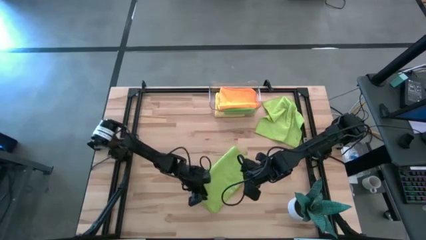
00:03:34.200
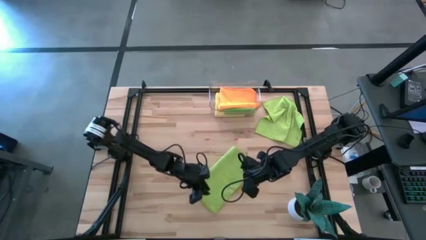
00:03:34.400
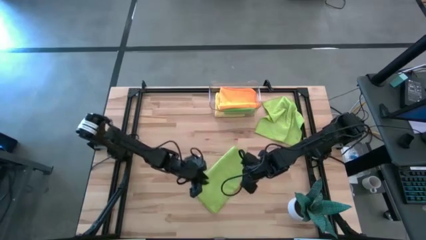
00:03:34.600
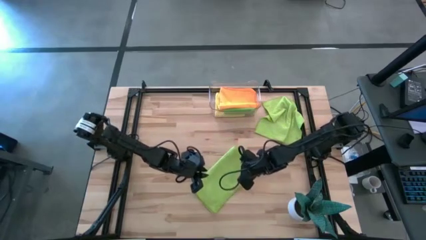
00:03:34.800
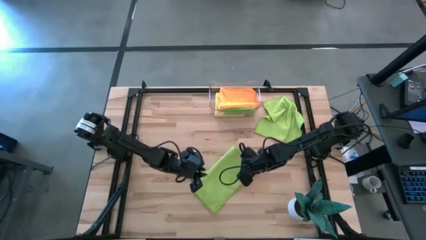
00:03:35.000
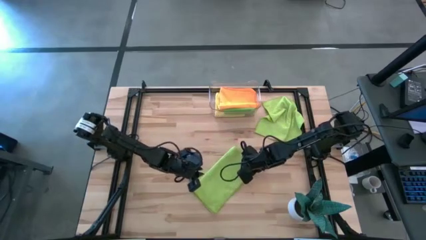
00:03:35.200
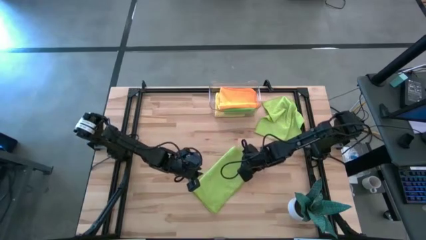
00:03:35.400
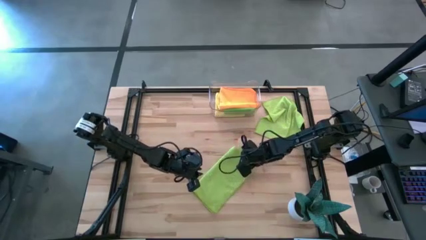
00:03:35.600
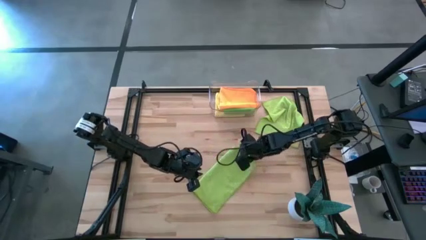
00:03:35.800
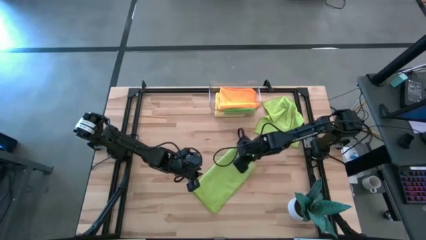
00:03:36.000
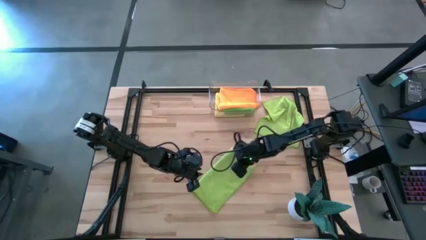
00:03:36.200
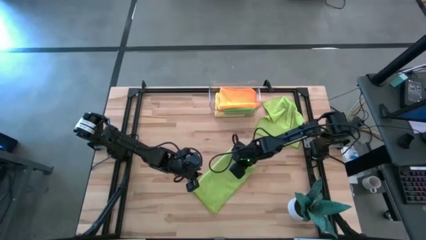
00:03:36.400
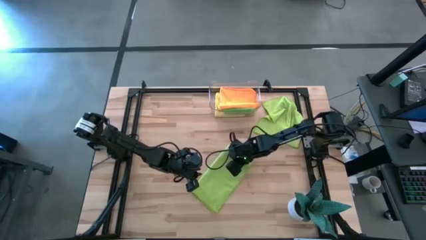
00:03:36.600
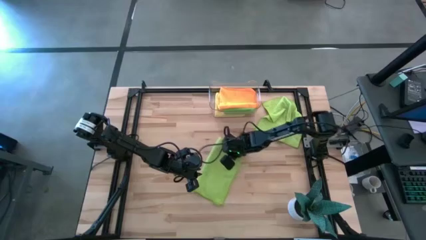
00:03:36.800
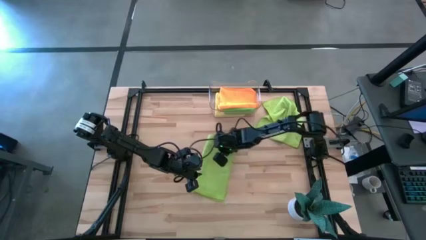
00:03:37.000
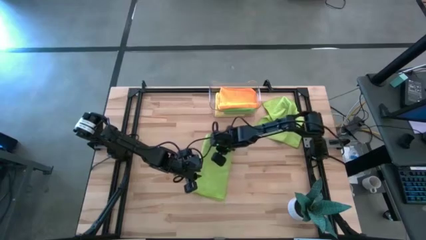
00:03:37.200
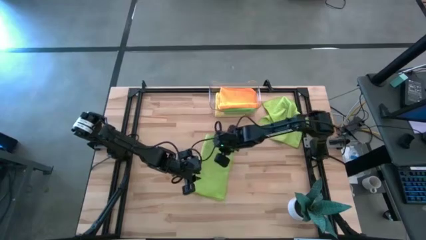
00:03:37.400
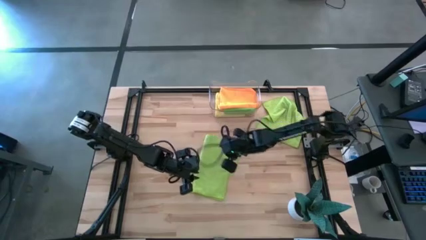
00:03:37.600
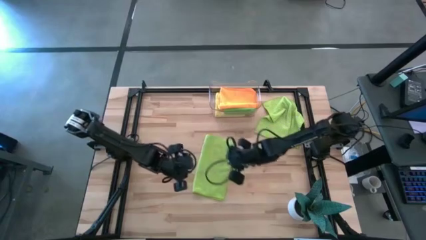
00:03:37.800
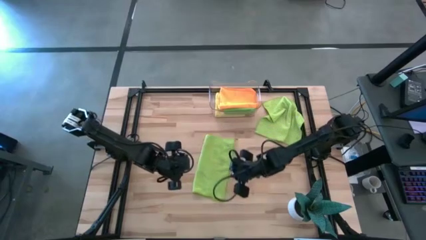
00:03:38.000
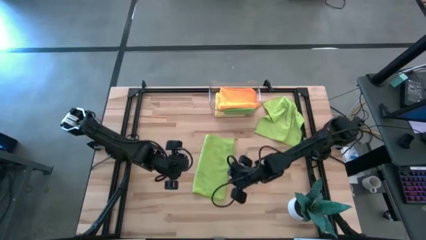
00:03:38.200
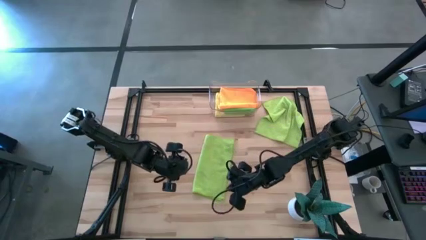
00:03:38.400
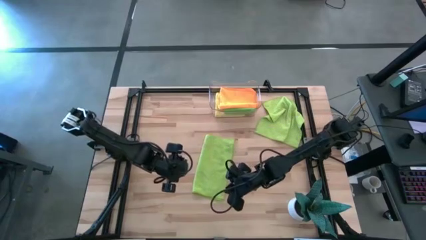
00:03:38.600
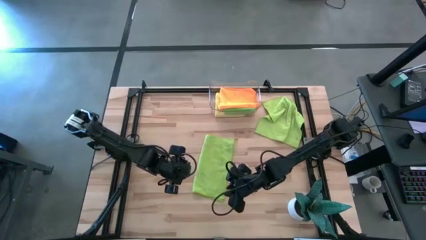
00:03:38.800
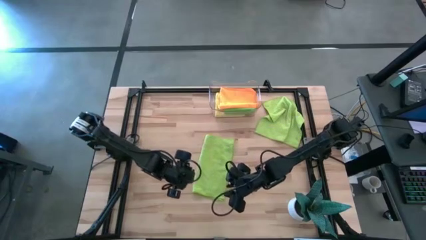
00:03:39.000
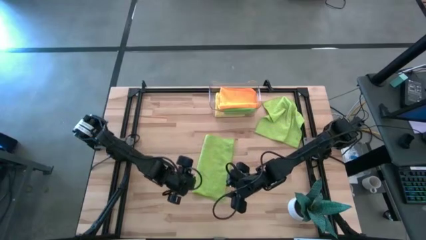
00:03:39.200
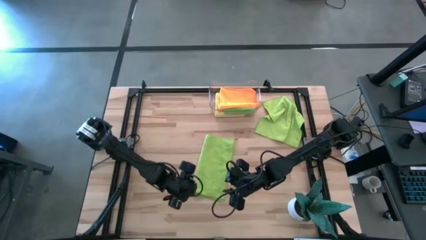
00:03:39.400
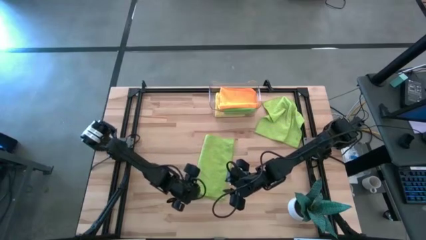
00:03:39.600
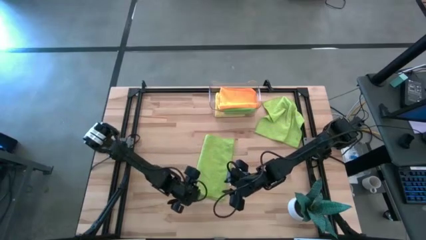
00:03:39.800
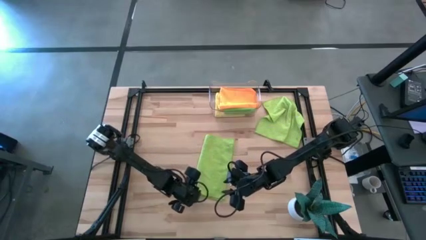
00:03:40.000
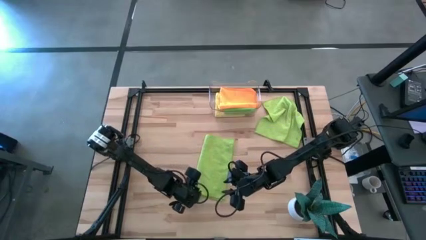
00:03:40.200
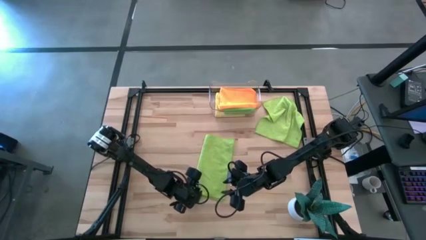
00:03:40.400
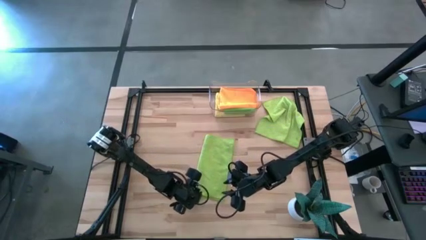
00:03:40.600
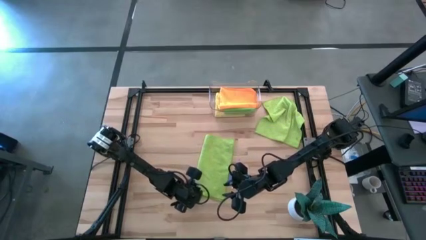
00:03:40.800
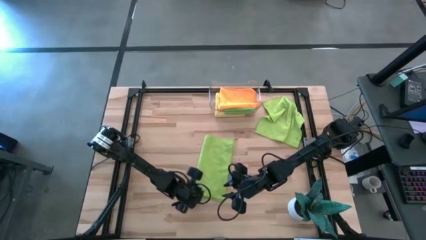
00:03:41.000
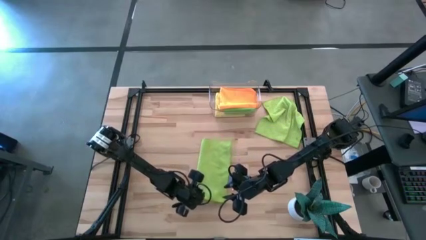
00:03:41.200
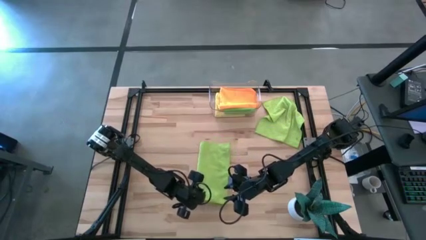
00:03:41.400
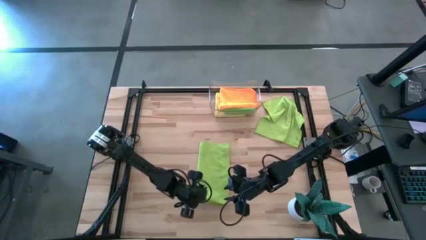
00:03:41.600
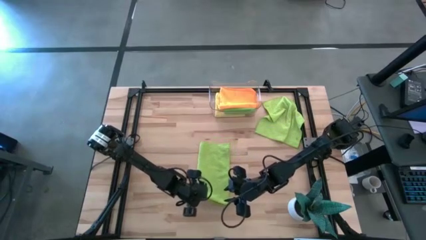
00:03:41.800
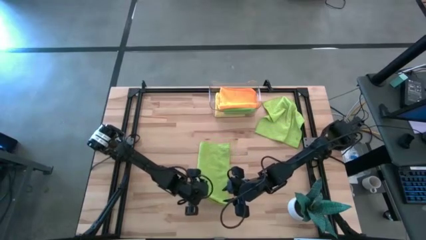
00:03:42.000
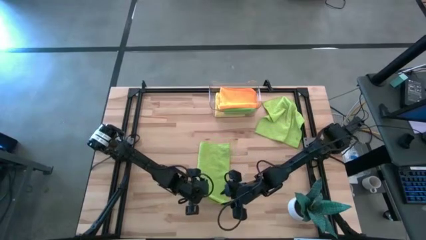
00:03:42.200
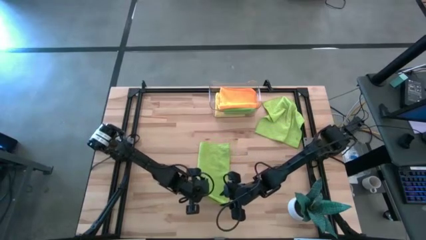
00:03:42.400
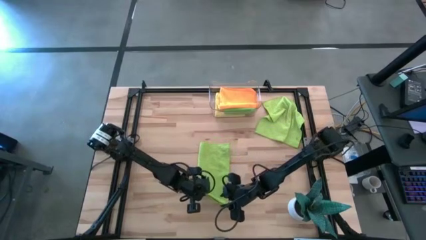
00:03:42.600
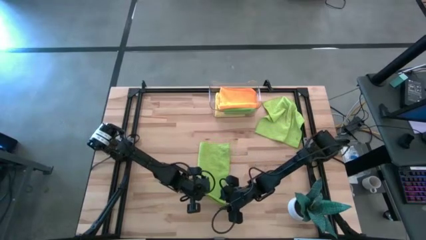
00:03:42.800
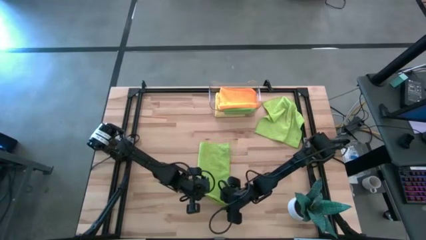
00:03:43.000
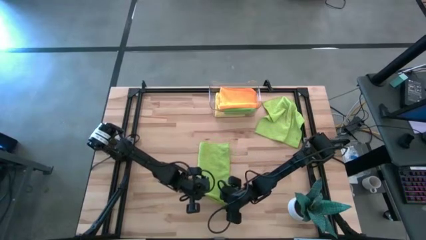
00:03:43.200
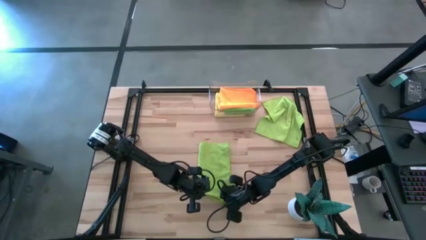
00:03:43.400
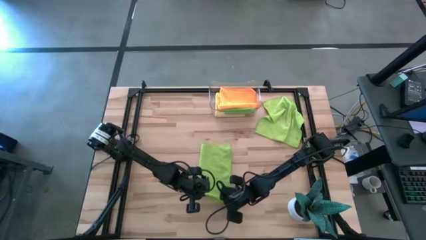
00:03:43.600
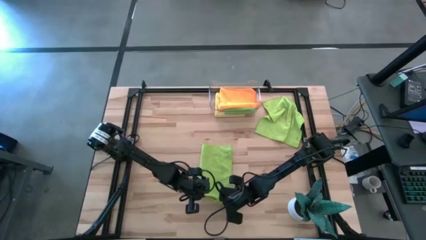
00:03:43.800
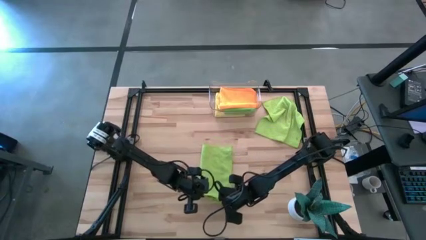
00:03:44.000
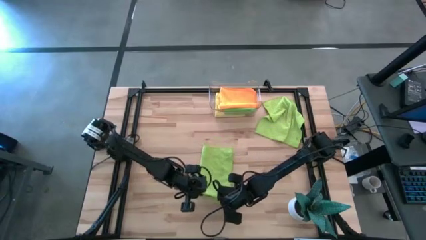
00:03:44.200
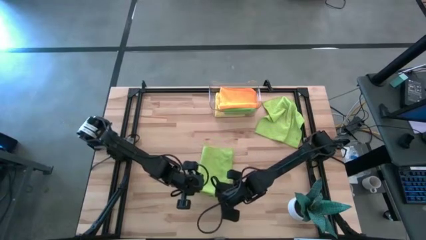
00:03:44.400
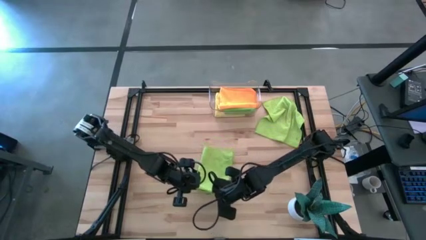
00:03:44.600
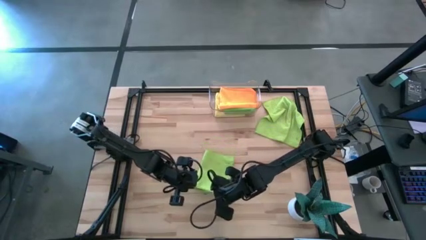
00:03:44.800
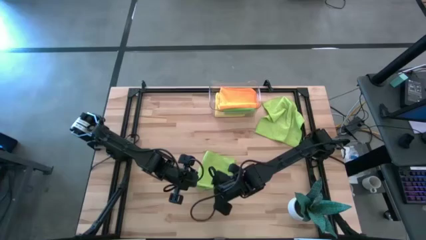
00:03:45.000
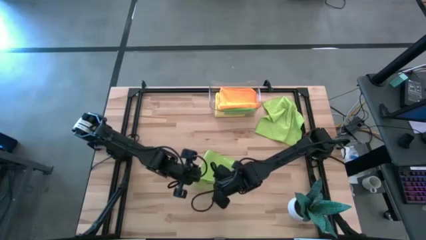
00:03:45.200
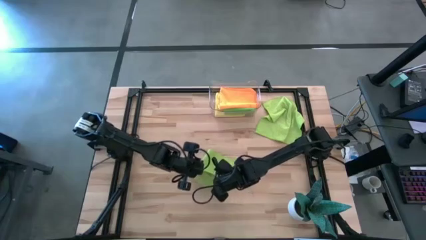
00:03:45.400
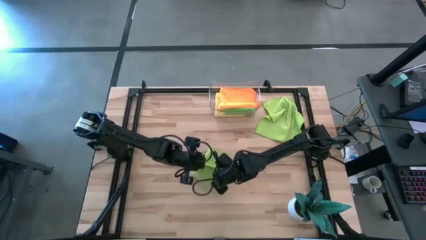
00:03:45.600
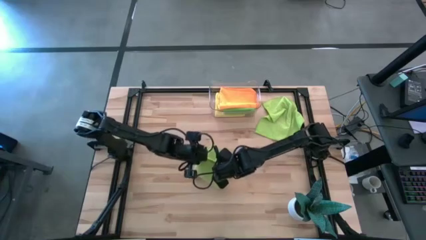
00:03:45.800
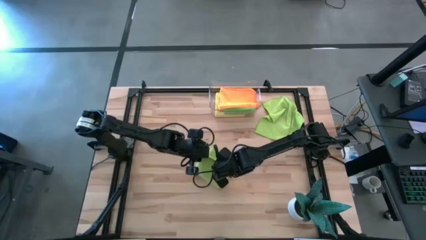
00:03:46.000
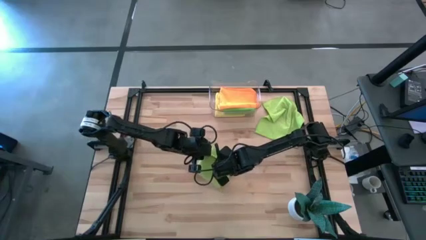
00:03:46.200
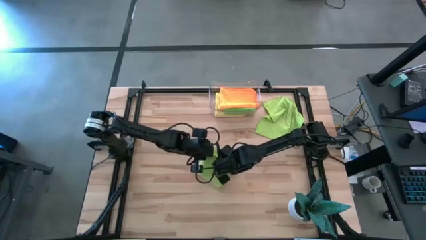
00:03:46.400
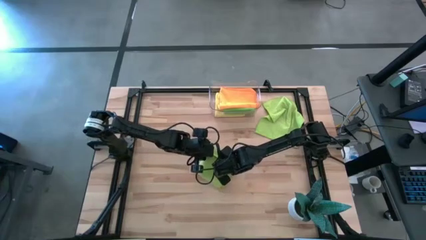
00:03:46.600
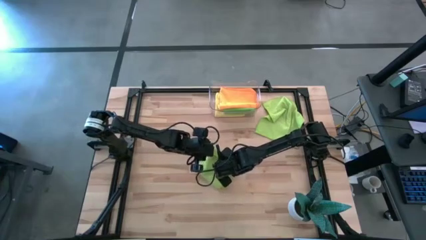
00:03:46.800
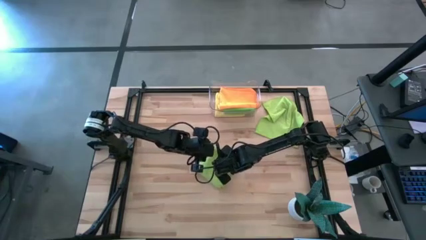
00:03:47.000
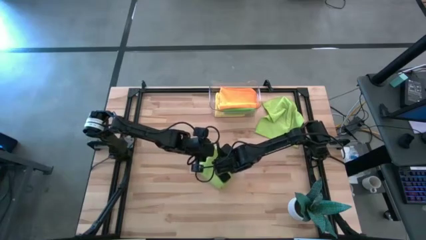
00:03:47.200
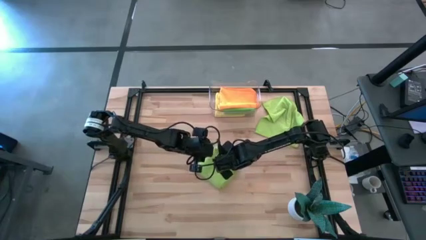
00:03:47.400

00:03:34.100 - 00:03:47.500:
Task: Fold microfiber towels
Fold the light green microfiber cloth
